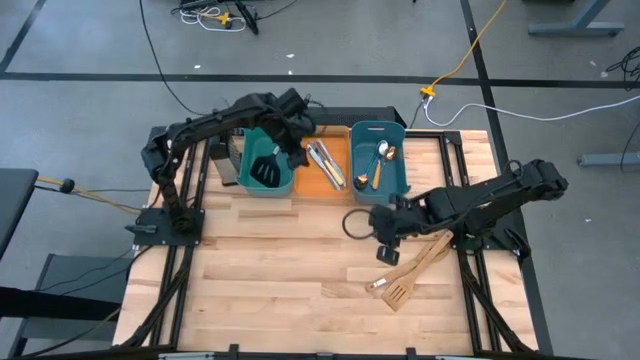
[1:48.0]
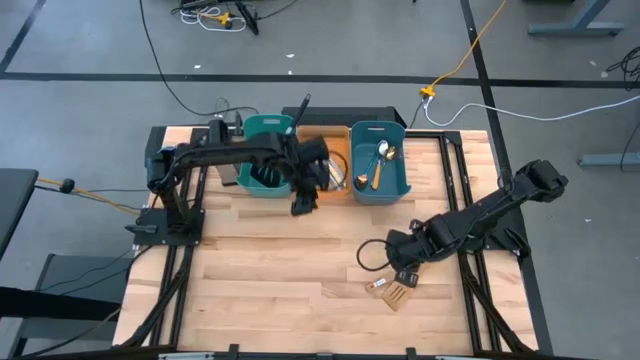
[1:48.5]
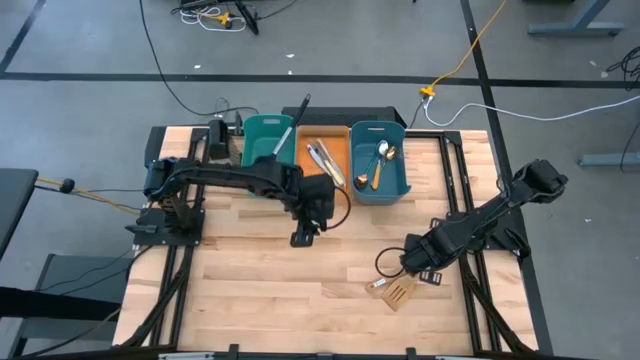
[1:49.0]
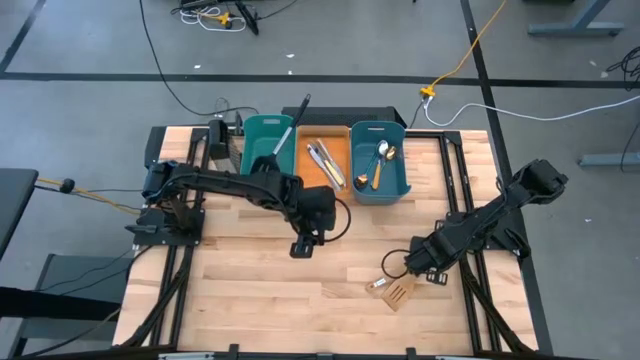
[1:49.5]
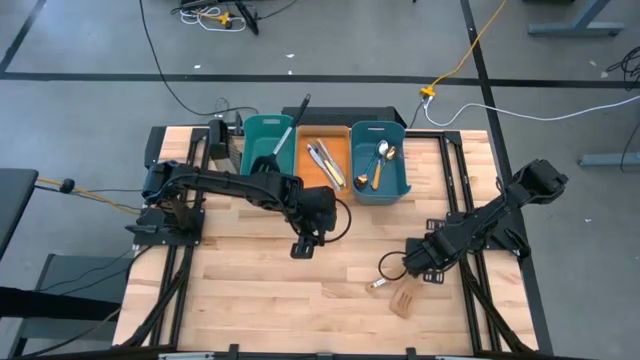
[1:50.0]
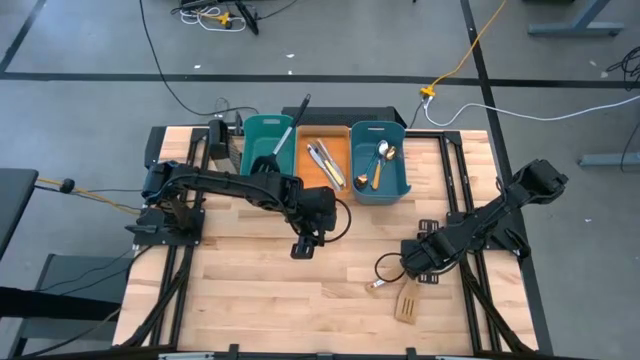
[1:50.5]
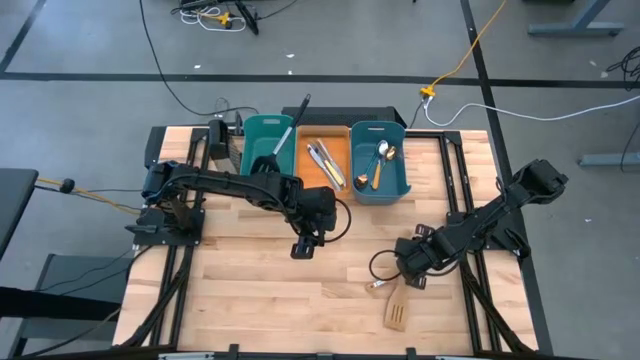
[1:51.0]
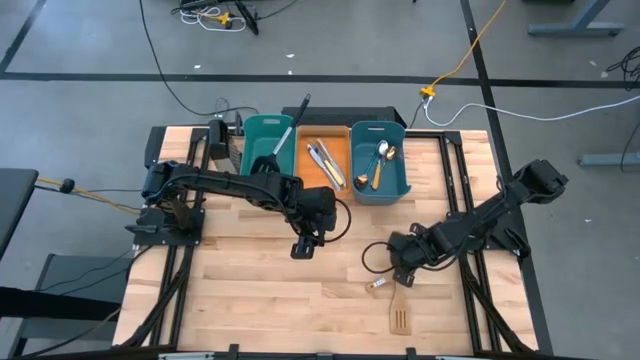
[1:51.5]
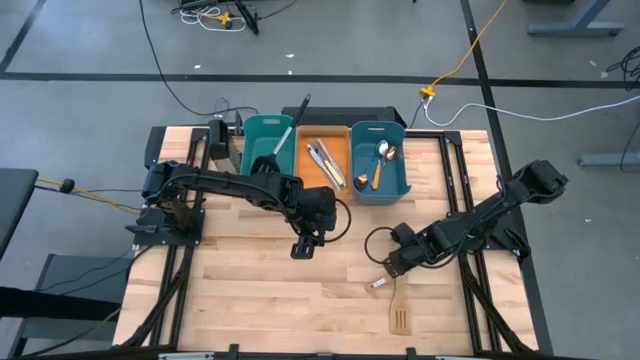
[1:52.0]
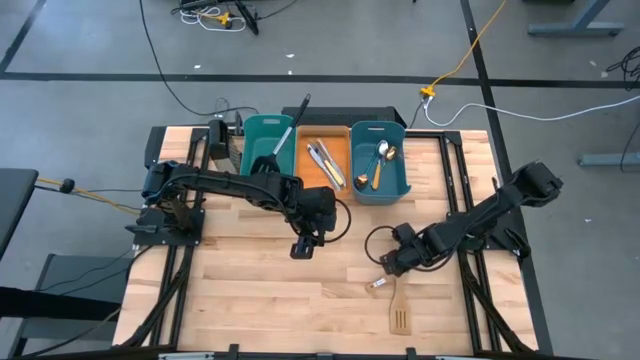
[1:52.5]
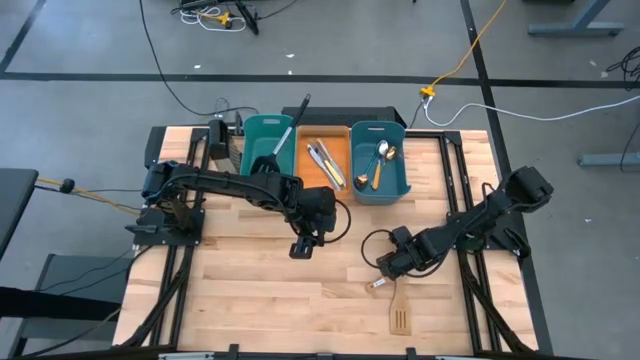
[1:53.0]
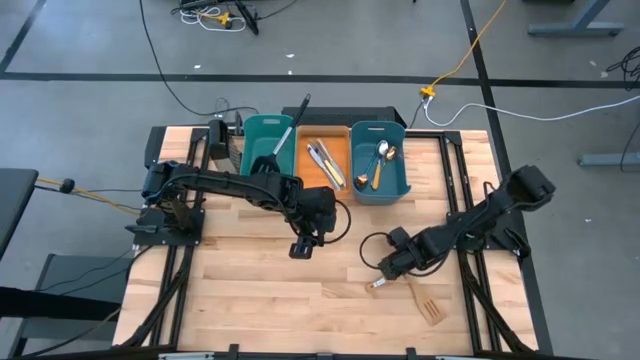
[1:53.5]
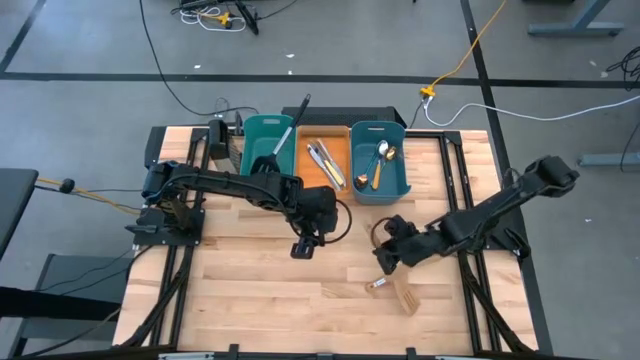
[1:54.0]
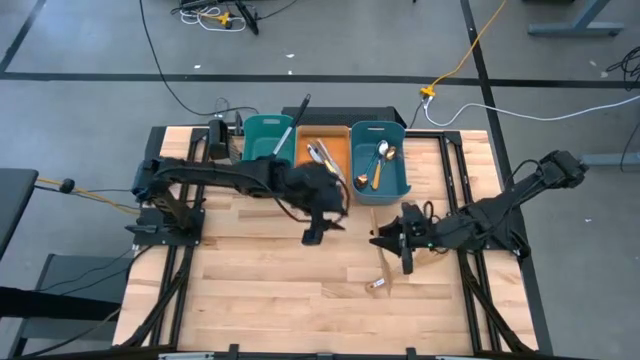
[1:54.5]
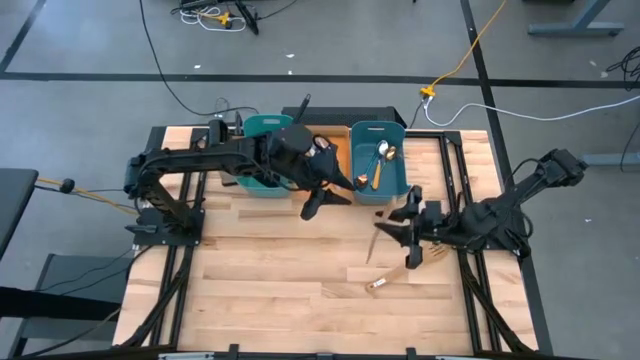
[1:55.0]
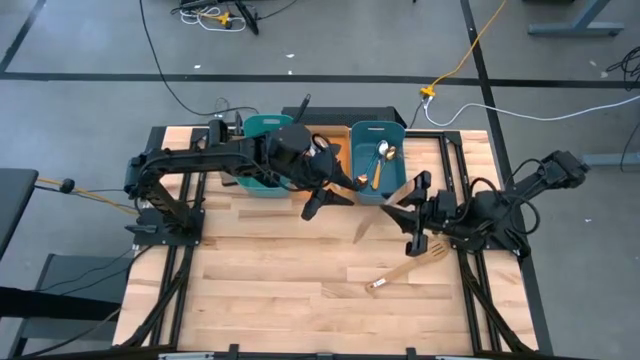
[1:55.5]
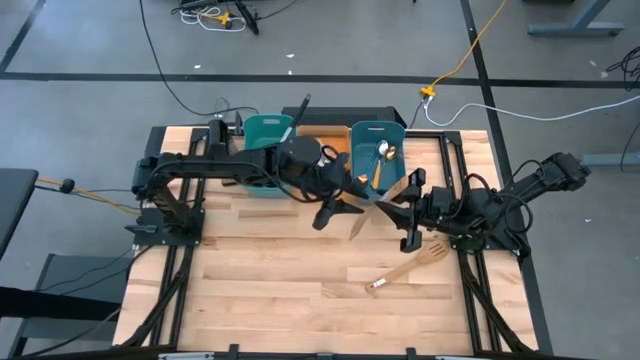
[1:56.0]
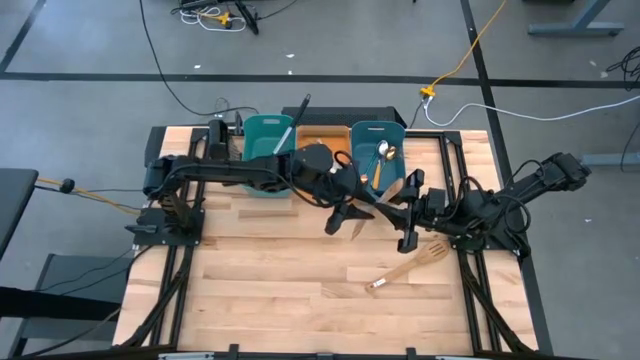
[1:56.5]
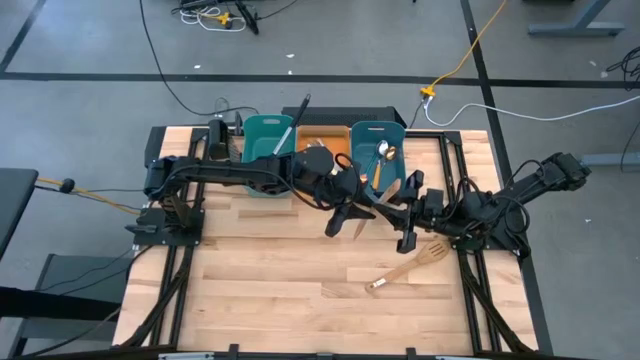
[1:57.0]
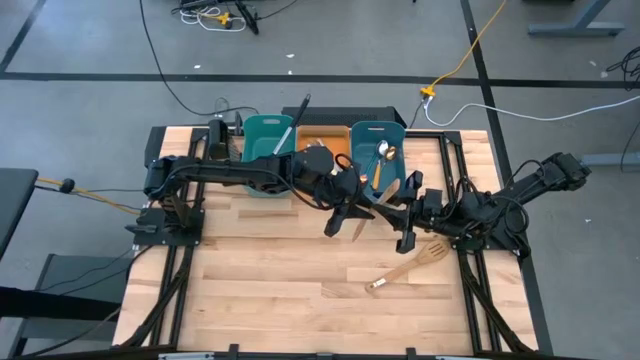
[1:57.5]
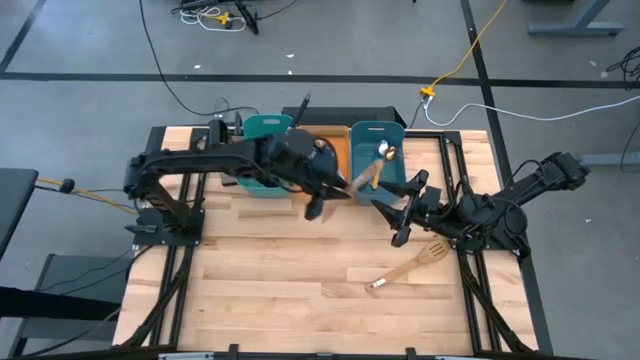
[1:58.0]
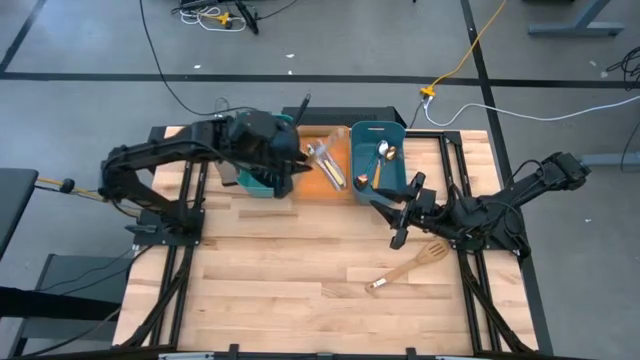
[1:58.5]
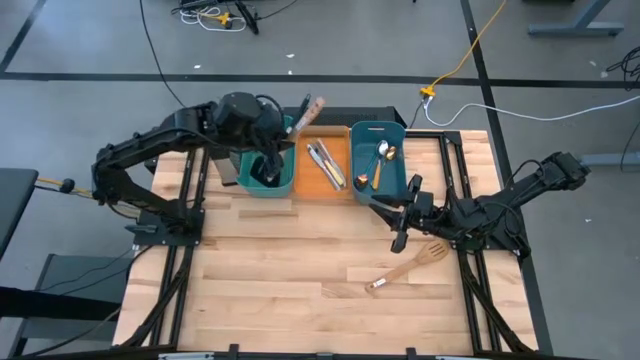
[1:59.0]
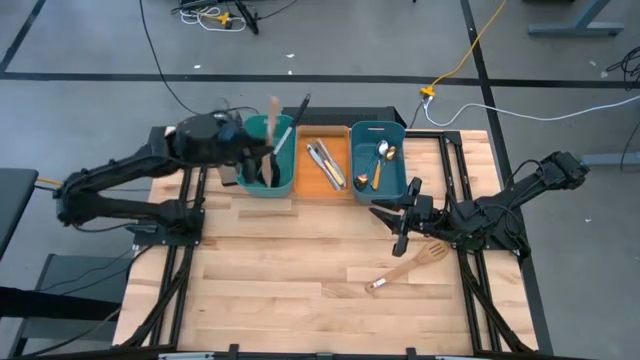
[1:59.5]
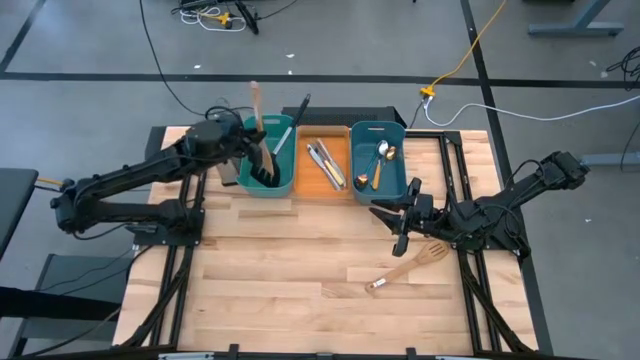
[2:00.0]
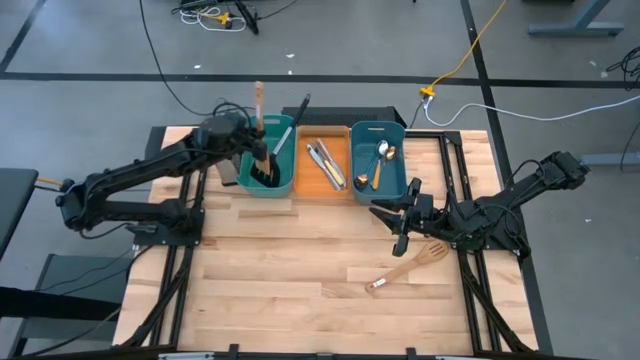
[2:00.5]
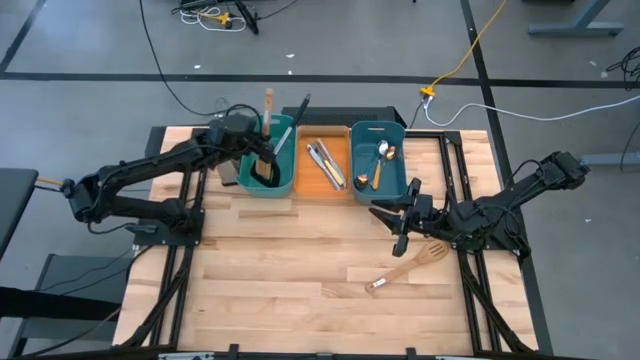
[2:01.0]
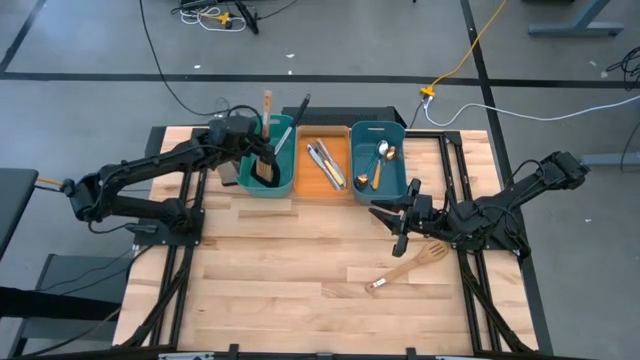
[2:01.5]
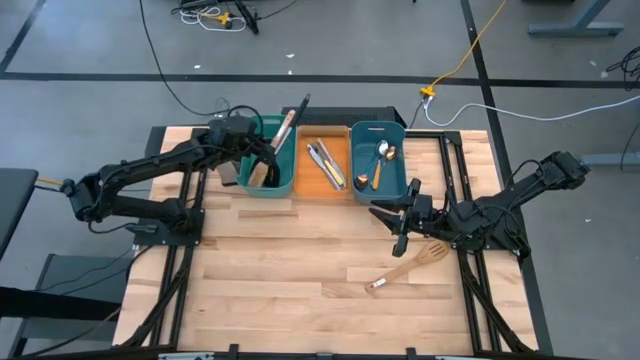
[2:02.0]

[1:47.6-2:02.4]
Task: Pick & Place Kitchen Items
Put the top wooden spatula into the green bin

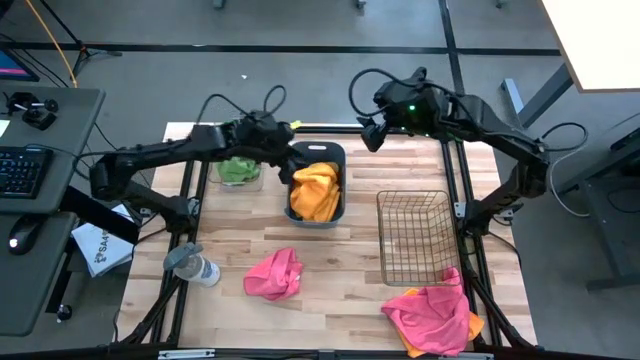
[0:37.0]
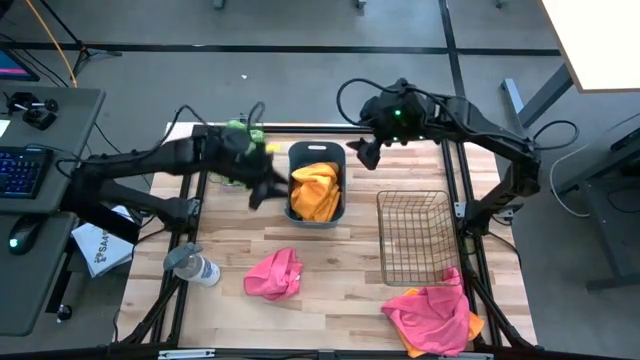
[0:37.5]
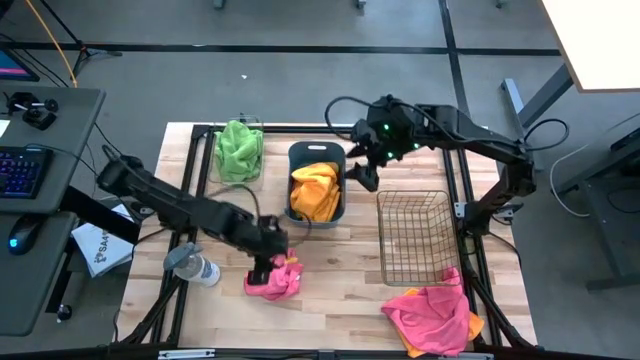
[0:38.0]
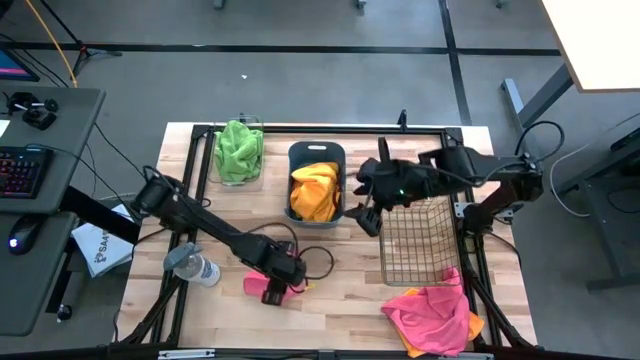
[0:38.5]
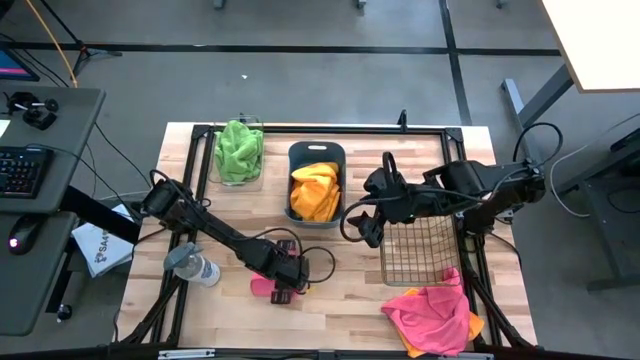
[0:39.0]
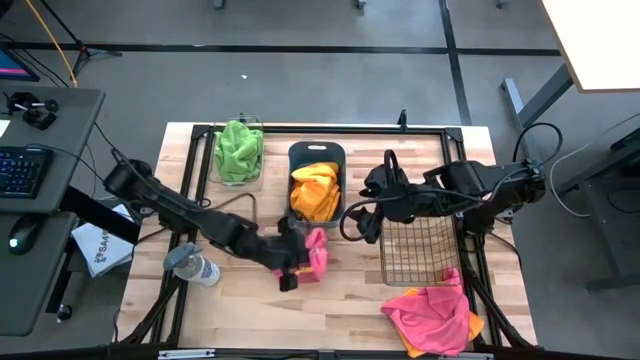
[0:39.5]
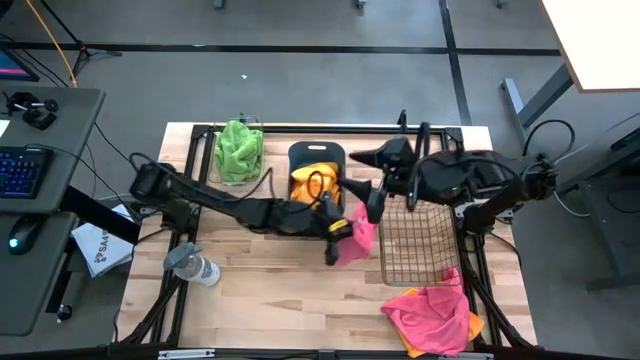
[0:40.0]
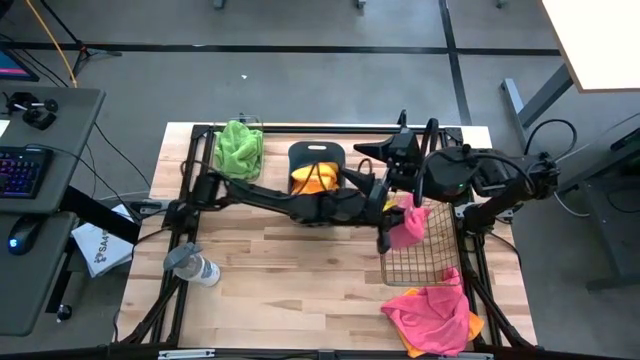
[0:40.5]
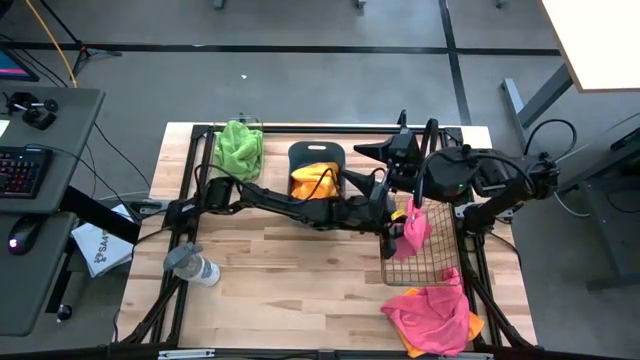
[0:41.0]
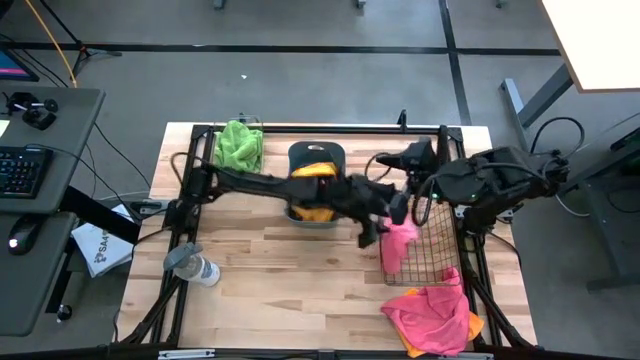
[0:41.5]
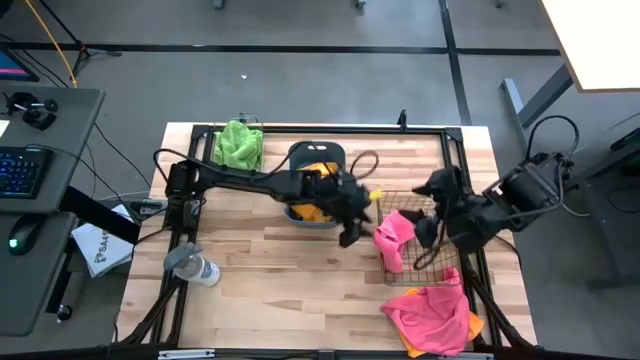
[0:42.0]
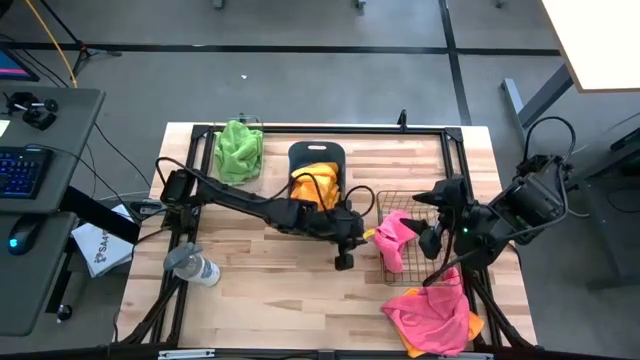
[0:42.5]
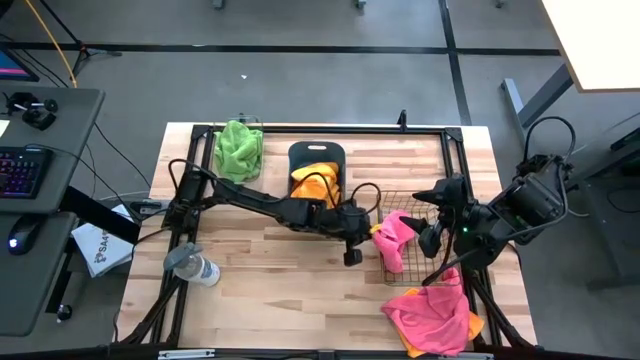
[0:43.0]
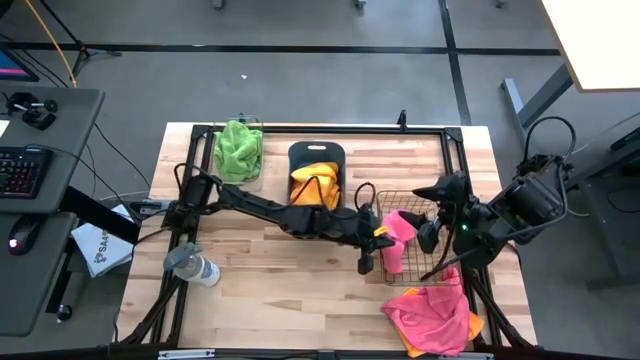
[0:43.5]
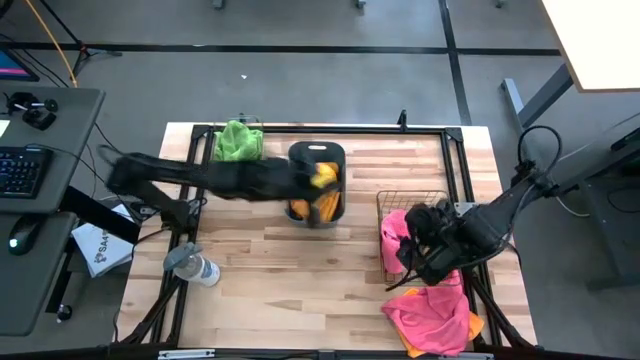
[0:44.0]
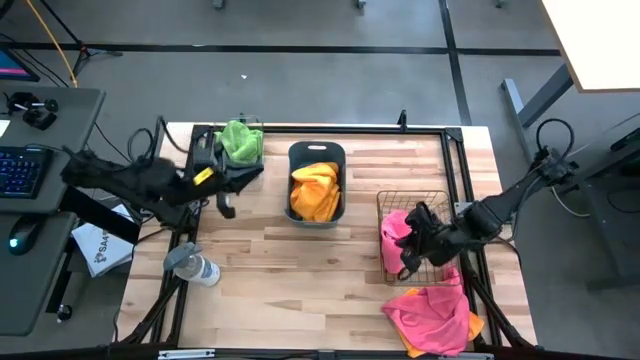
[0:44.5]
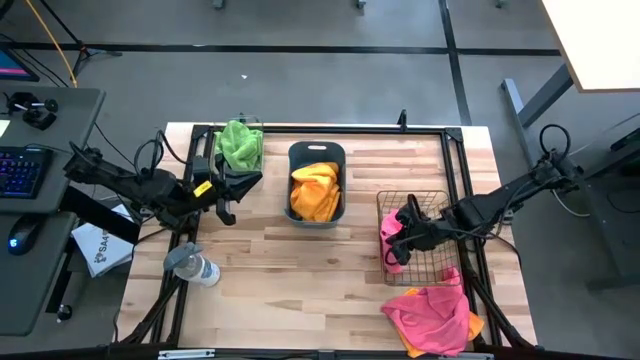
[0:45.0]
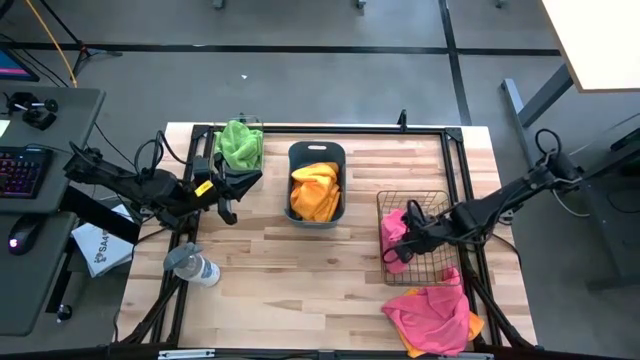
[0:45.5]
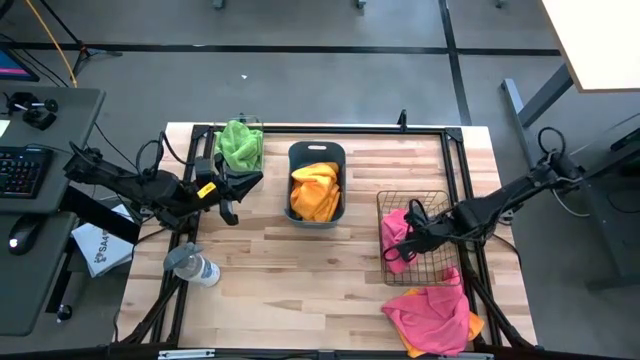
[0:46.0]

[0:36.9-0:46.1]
Task: Sort microfiber towel by color & place in baskets
Put the left pink towel into the brown wire basket
